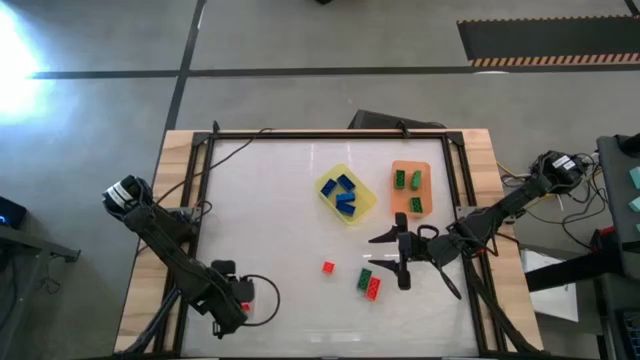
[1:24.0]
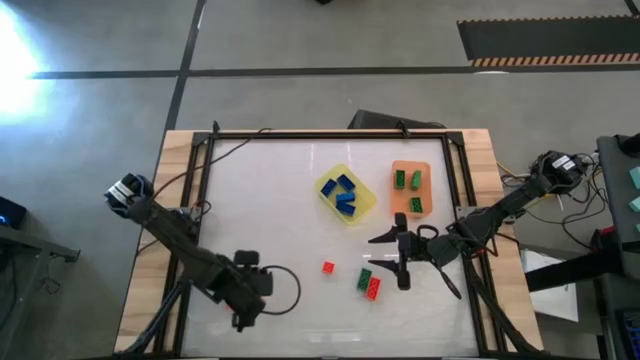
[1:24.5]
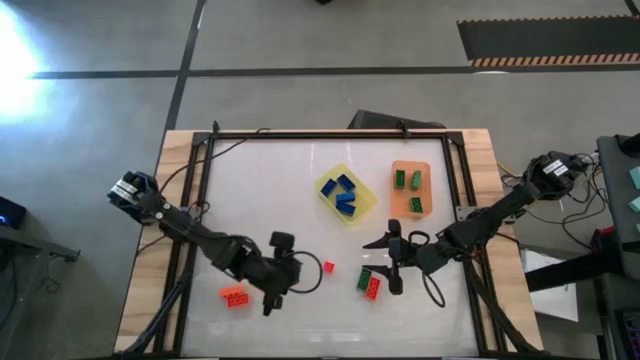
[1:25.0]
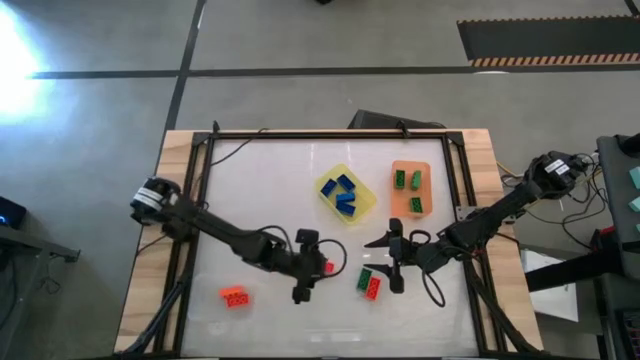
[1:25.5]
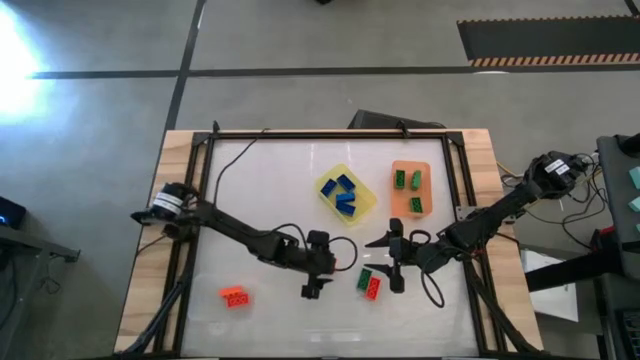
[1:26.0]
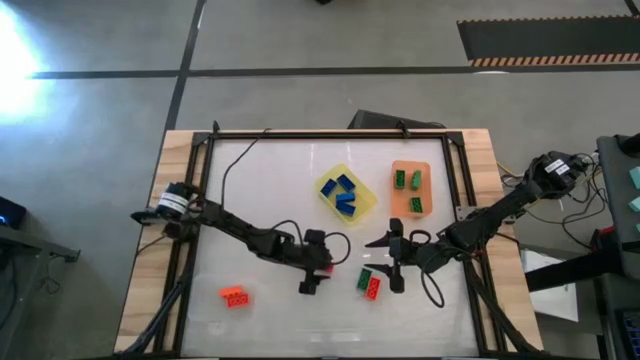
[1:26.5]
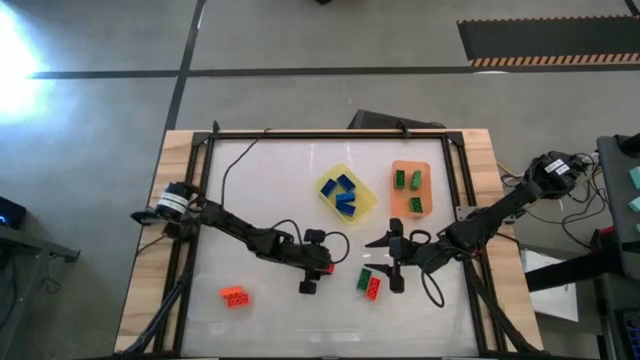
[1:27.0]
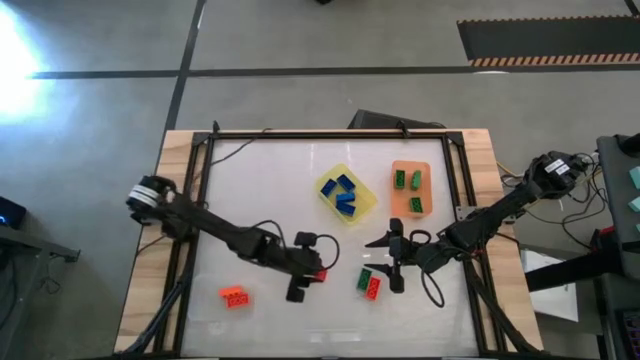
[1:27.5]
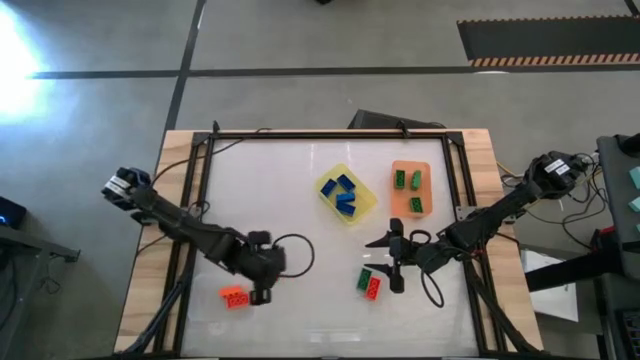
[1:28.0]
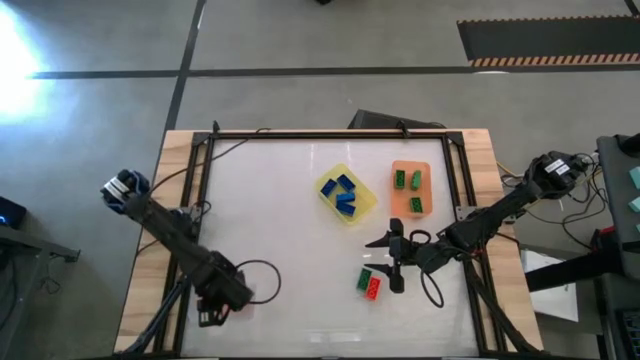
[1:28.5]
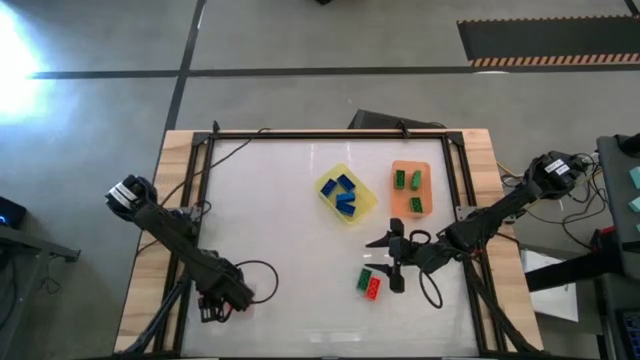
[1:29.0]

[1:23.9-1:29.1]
Task: Sort & place blocks by color
Put the orange game piece into the transparent bin

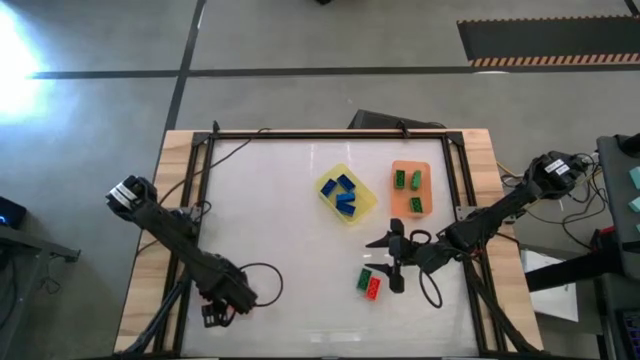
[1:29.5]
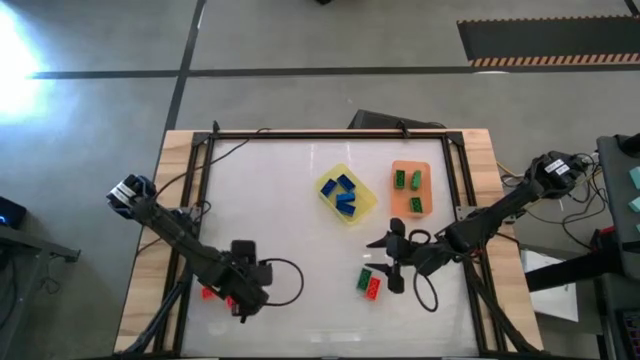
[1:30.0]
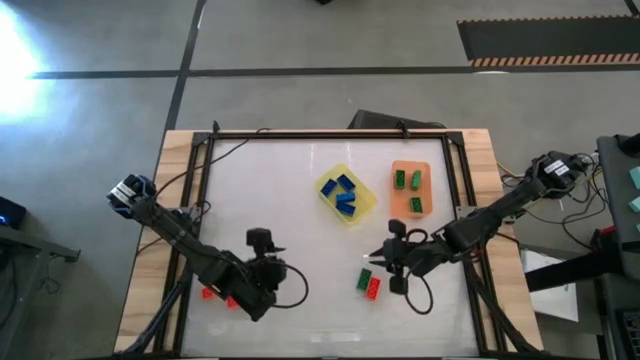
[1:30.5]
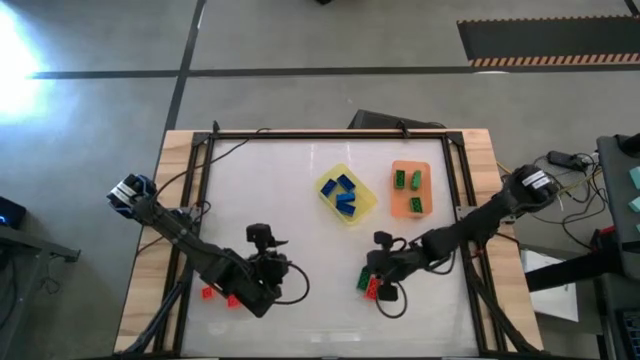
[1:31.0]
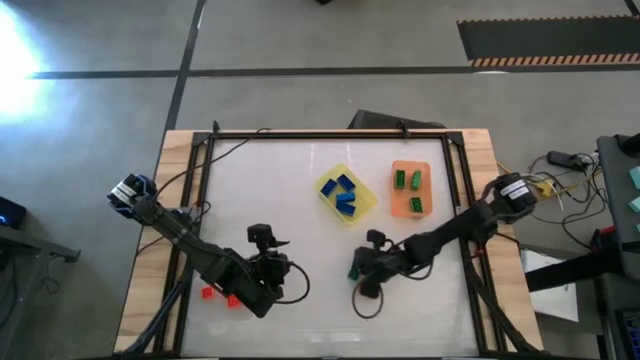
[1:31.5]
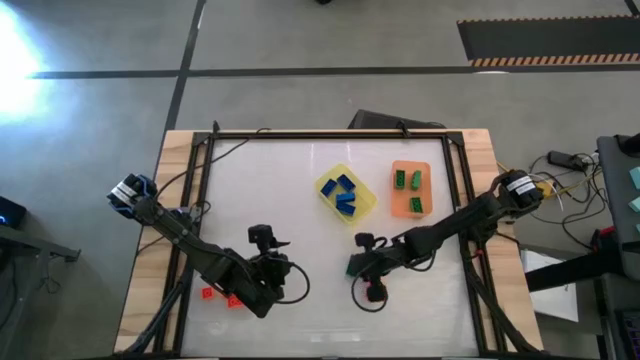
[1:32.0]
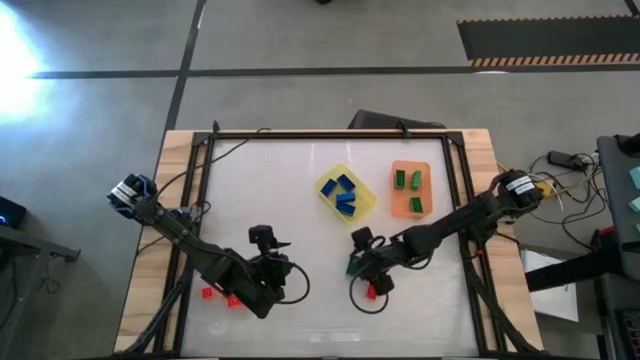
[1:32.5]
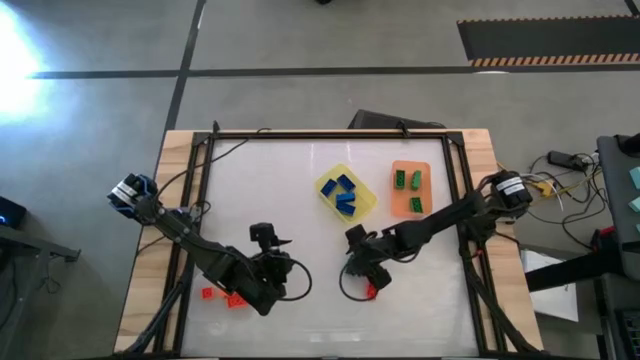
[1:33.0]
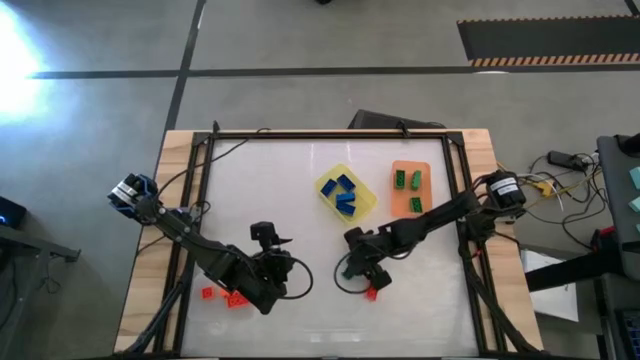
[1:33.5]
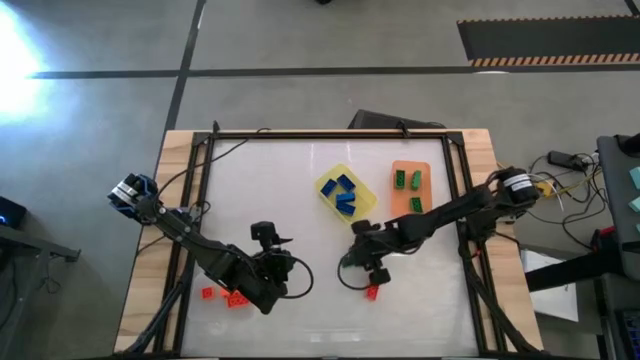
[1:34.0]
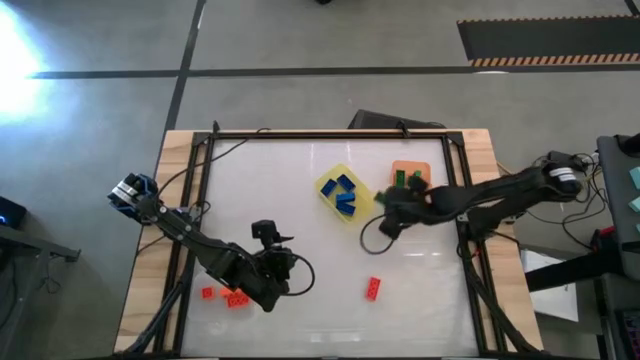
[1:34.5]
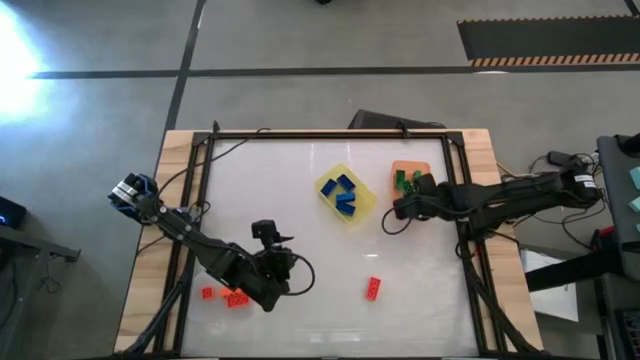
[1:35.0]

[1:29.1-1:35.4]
Put the green game piece into the orange bin

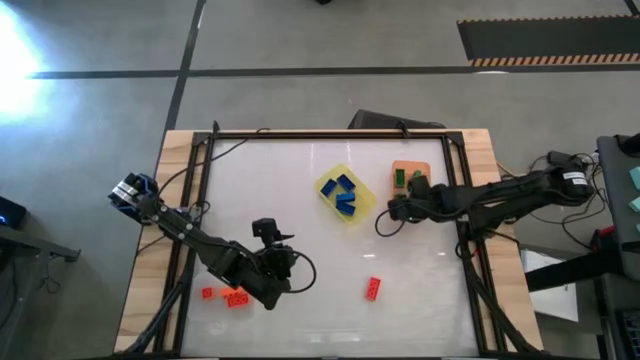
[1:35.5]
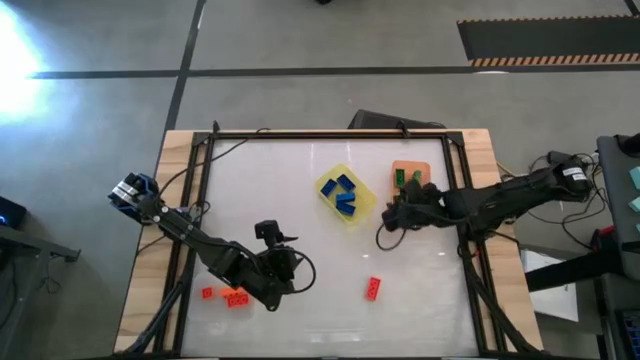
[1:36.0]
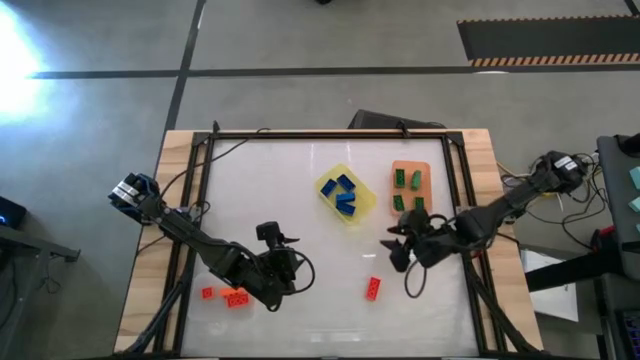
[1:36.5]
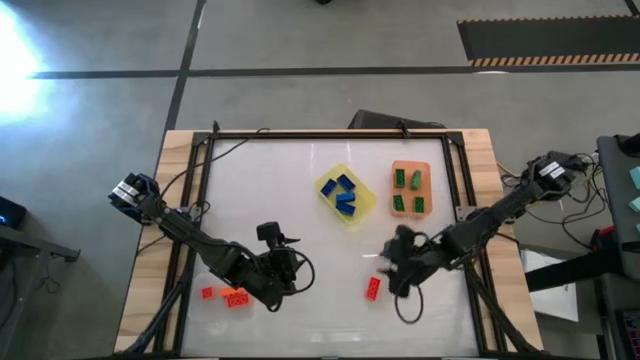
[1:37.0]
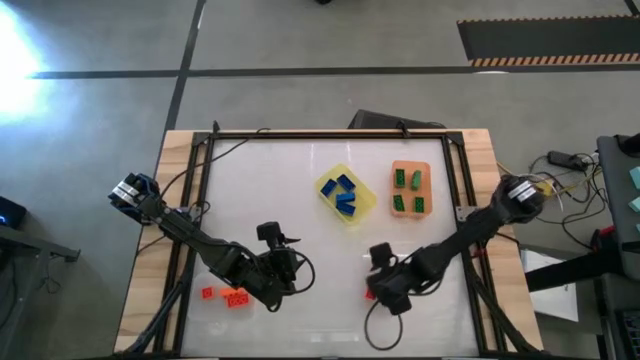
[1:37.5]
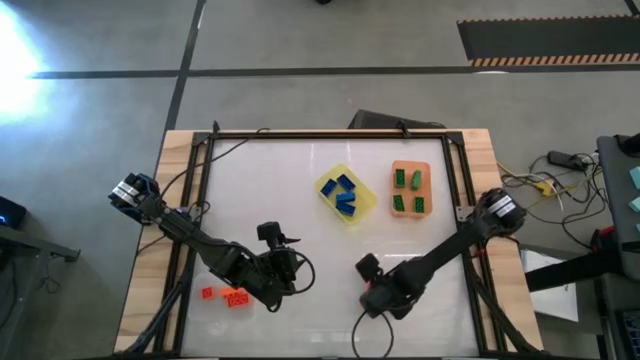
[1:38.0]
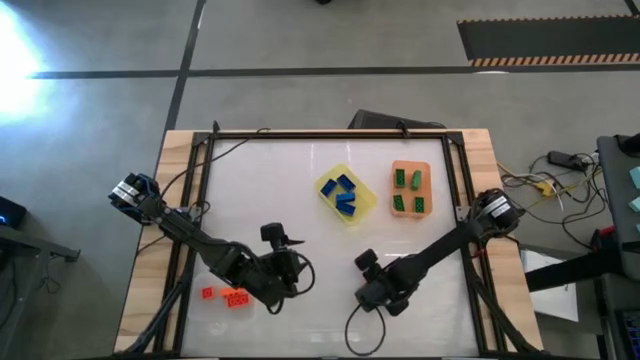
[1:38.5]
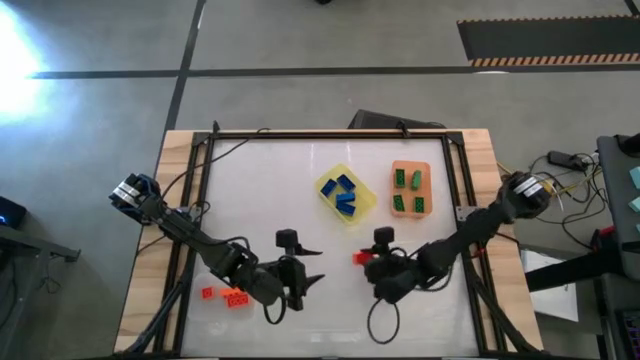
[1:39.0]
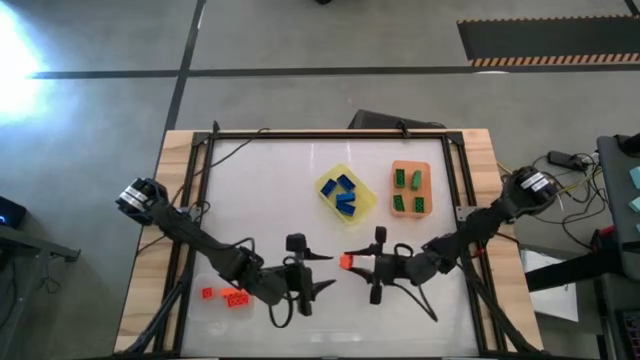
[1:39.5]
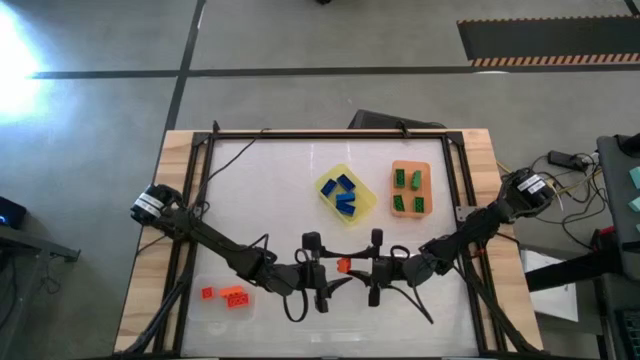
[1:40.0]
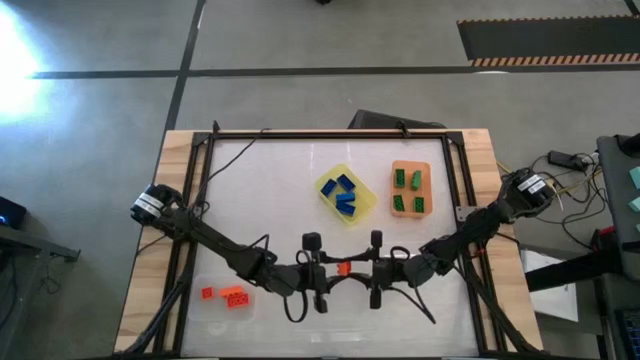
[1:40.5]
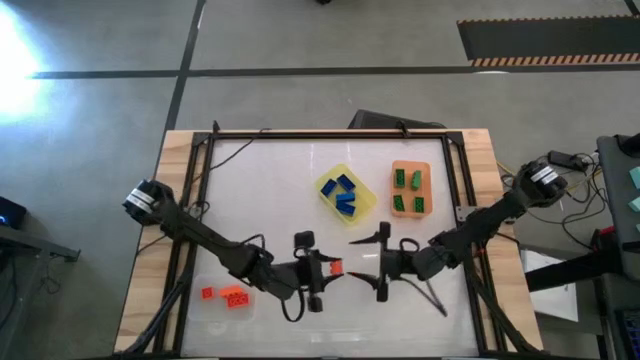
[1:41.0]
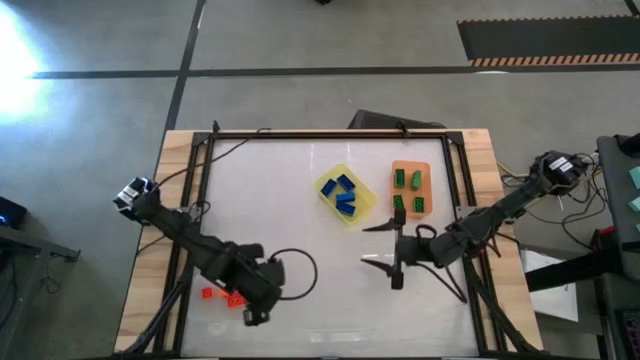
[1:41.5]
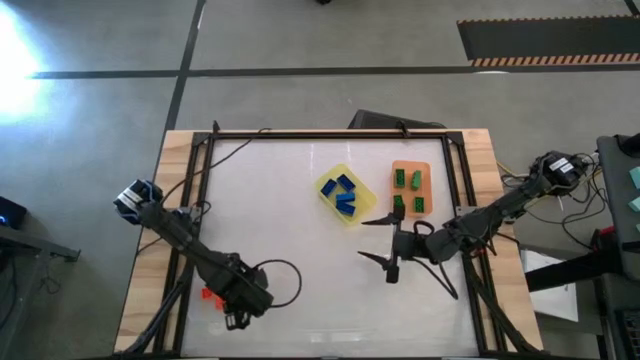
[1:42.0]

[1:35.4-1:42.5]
Put the orange game piece into the transparent bin

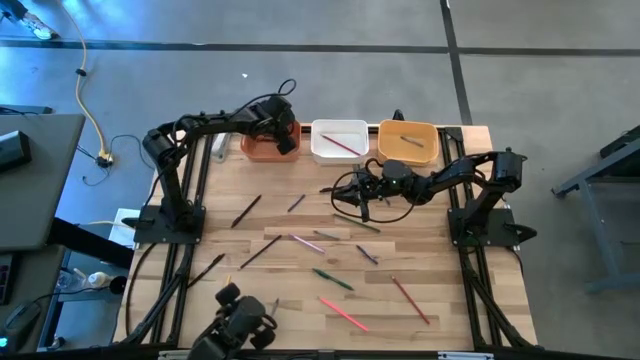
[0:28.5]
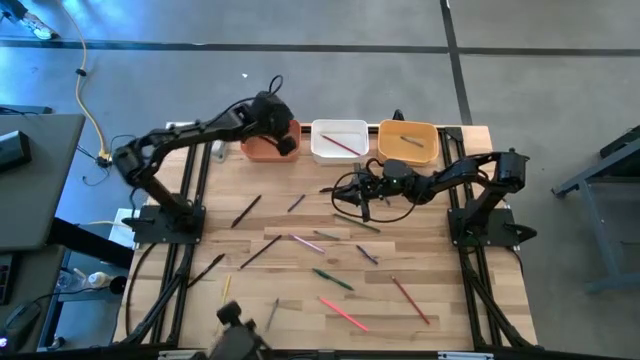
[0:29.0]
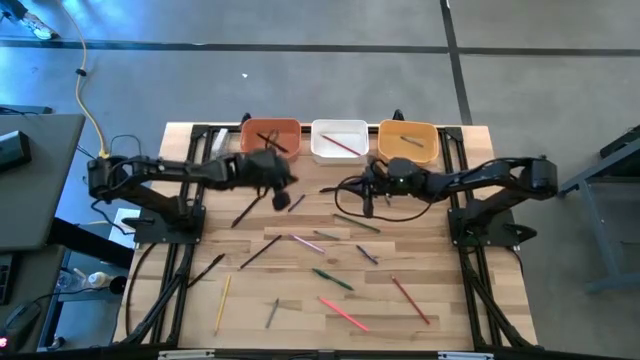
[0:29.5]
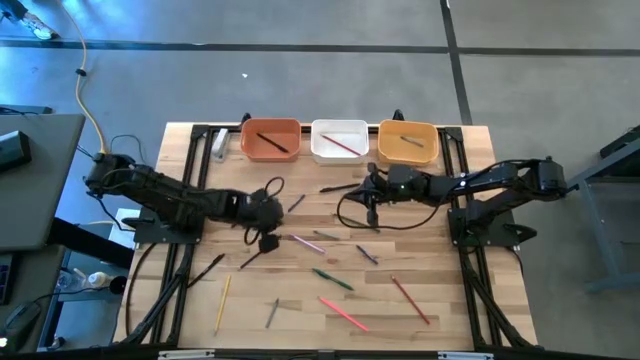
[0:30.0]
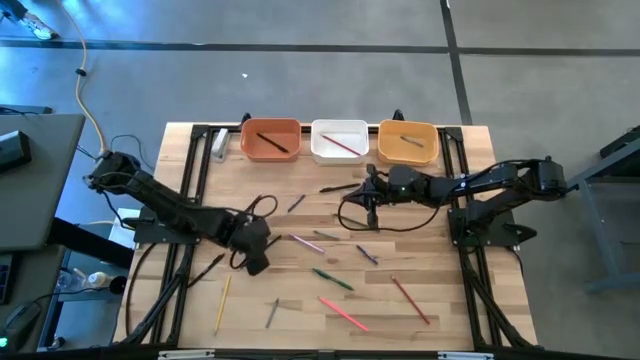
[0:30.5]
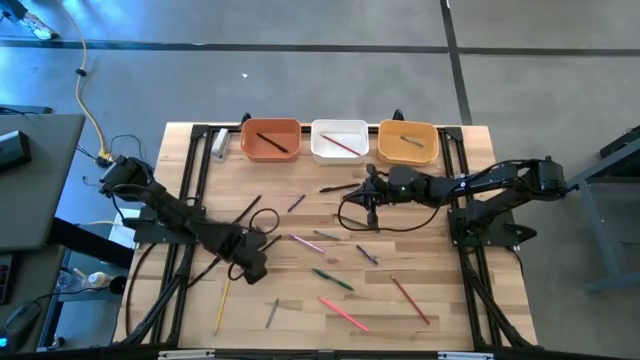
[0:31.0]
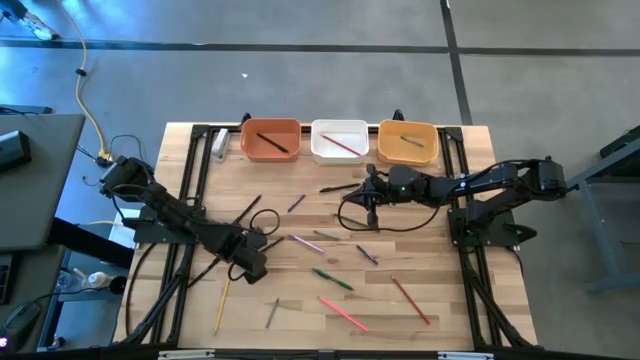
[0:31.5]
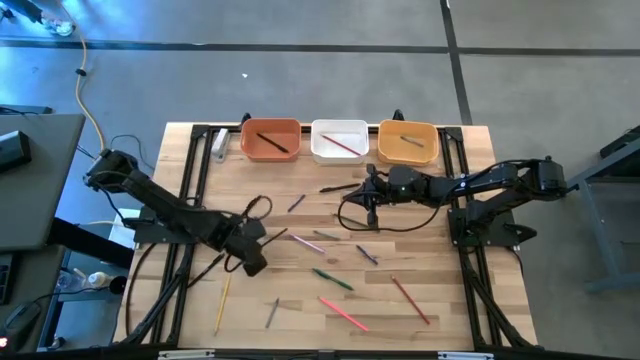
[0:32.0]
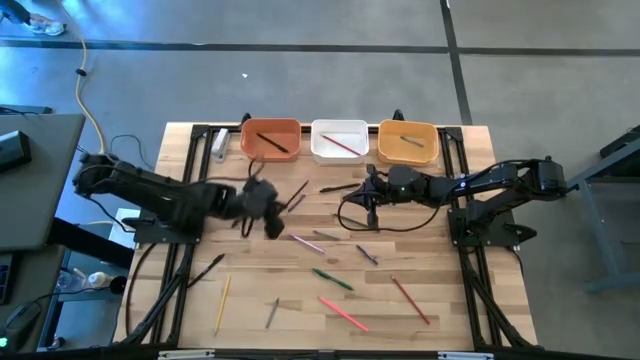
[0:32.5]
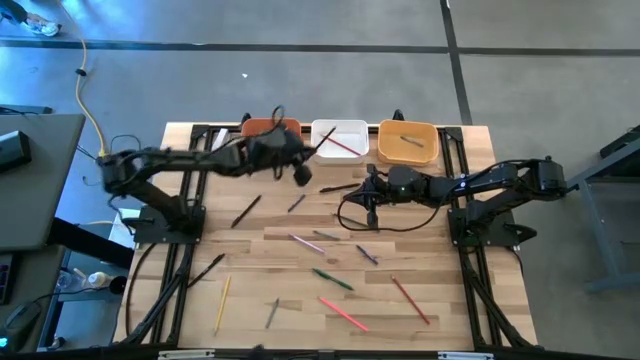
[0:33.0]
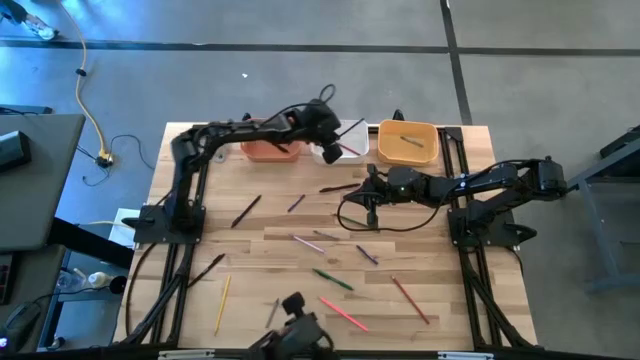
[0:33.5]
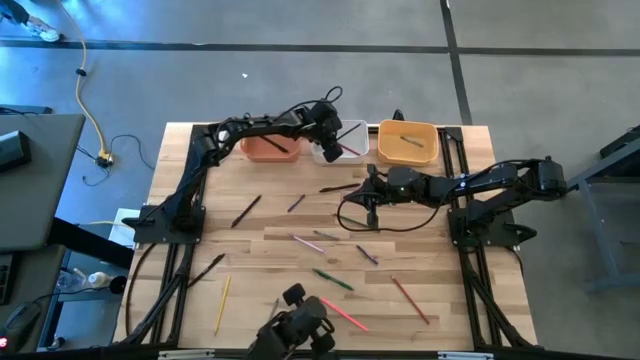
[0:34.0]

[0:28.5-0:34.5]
Task: Sort crayons/erasers/pens/pencils in bins
Put the black pencil into the white bin
